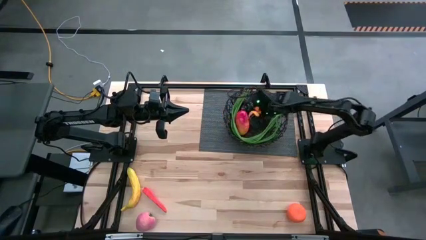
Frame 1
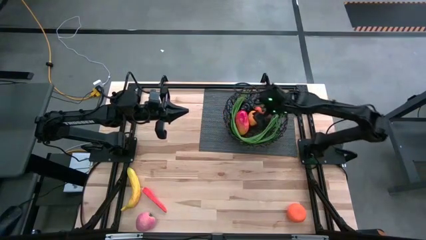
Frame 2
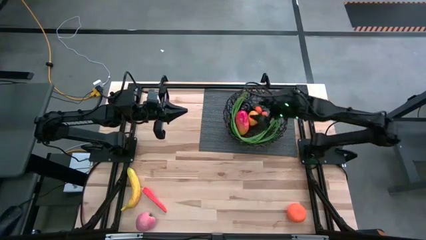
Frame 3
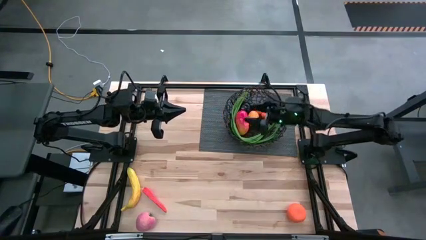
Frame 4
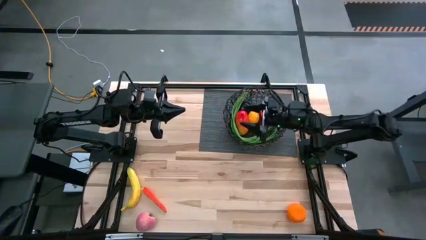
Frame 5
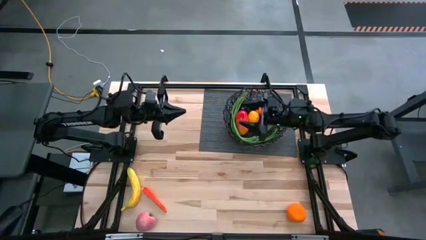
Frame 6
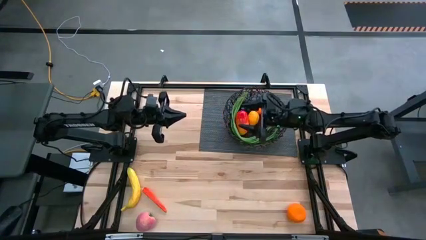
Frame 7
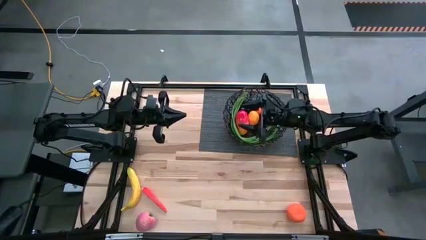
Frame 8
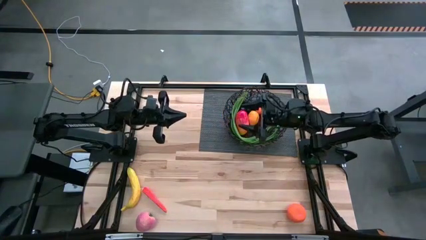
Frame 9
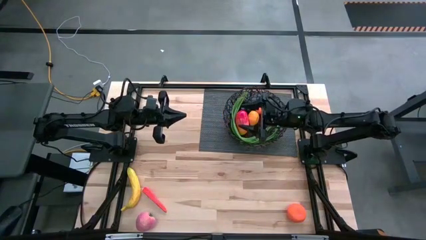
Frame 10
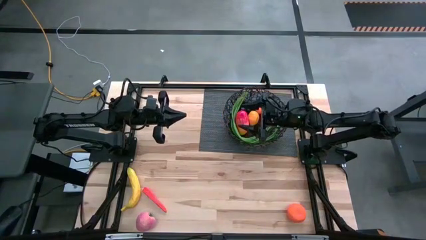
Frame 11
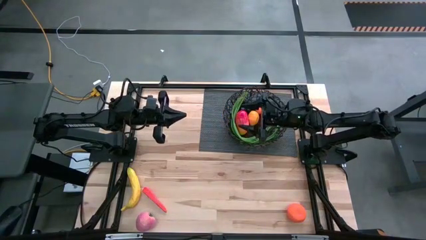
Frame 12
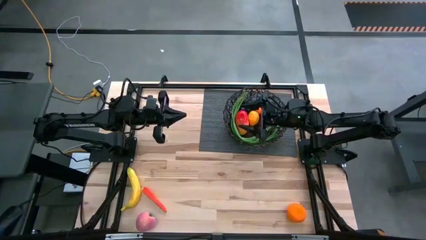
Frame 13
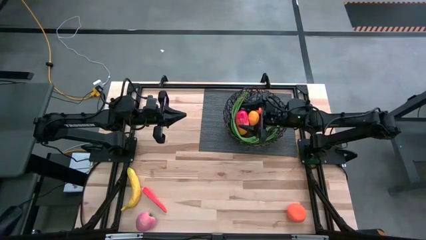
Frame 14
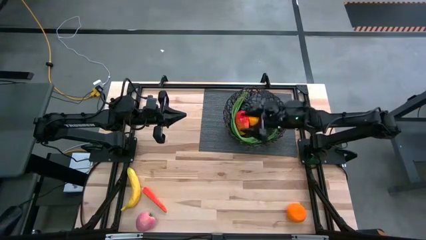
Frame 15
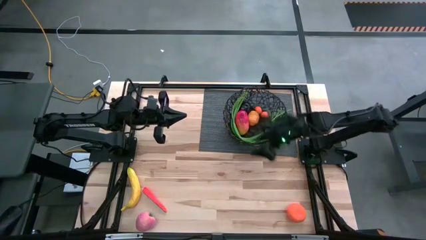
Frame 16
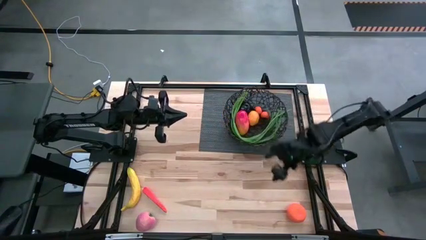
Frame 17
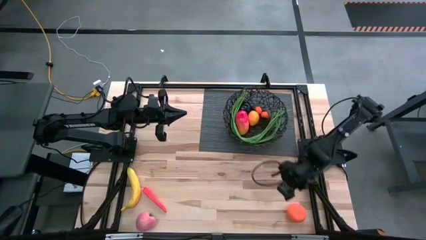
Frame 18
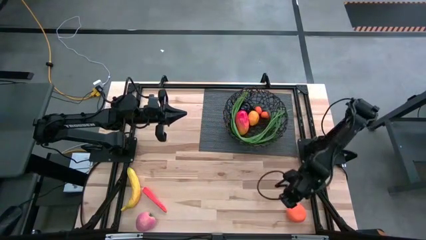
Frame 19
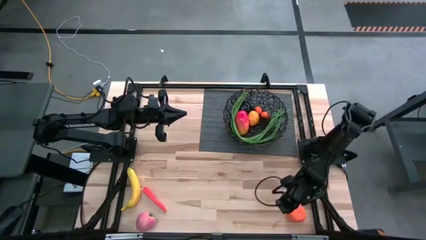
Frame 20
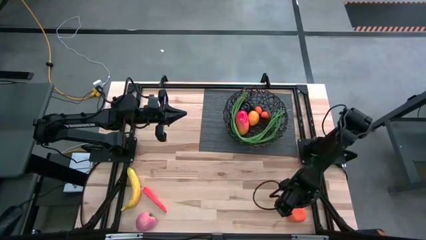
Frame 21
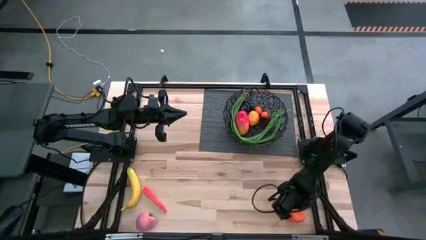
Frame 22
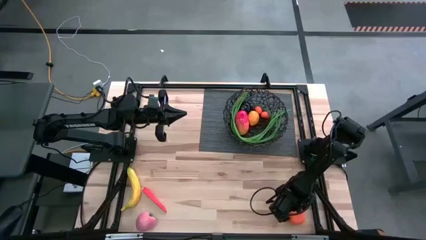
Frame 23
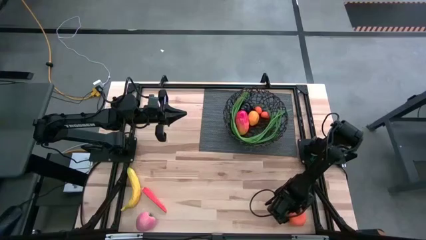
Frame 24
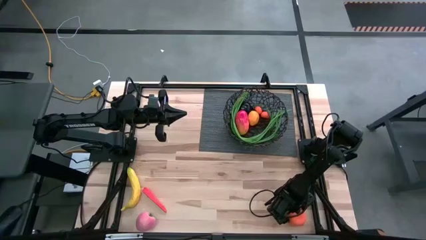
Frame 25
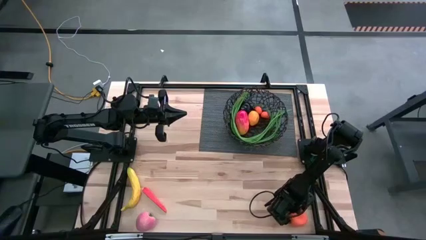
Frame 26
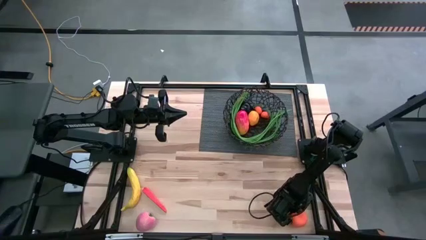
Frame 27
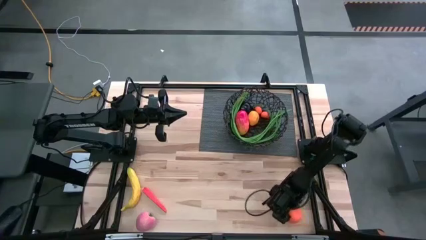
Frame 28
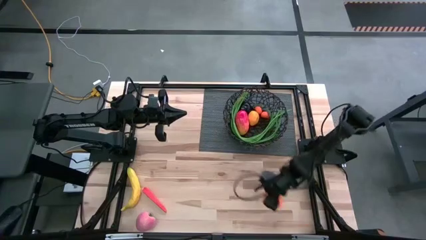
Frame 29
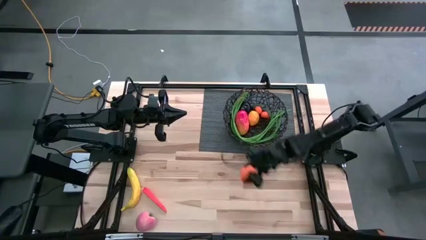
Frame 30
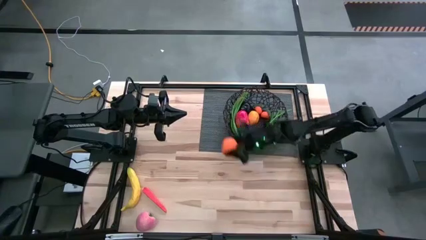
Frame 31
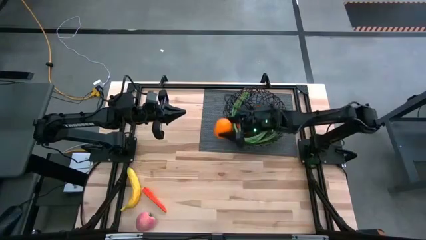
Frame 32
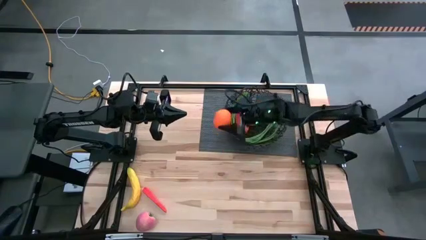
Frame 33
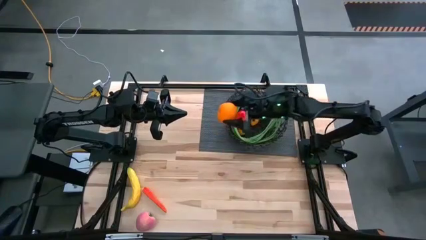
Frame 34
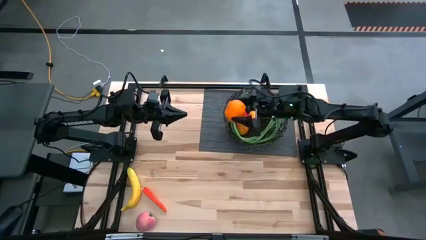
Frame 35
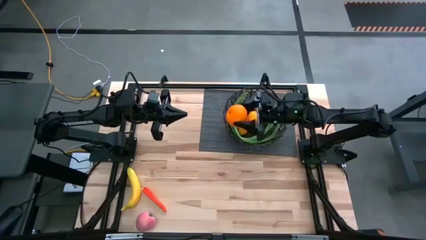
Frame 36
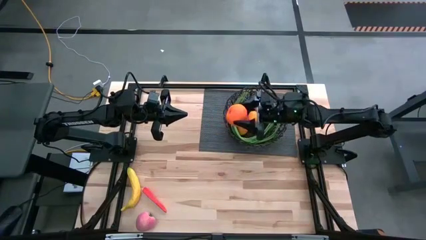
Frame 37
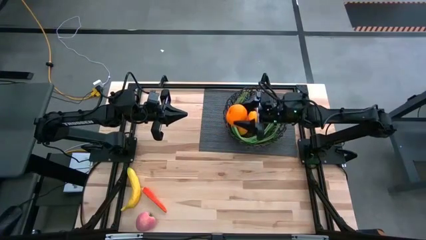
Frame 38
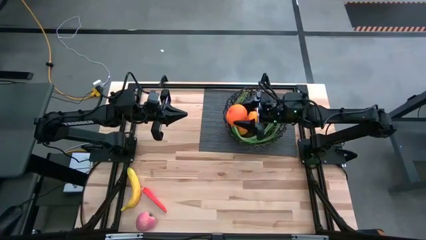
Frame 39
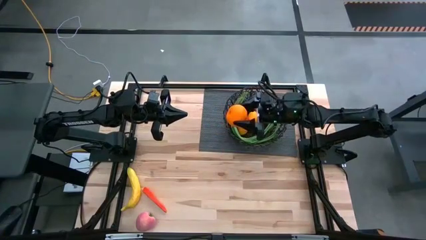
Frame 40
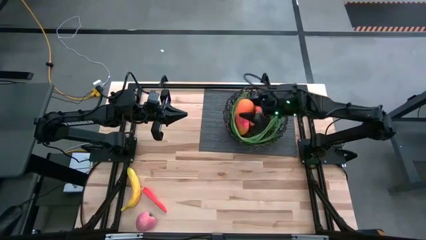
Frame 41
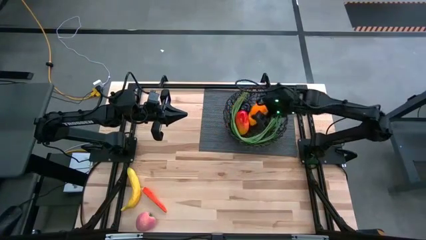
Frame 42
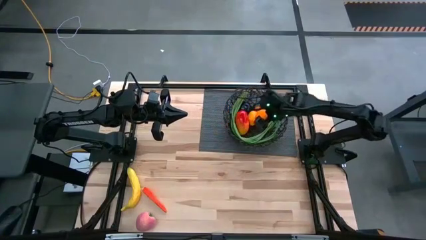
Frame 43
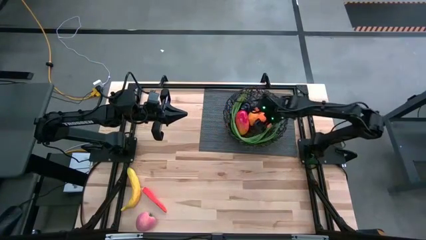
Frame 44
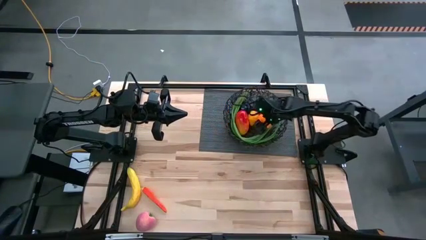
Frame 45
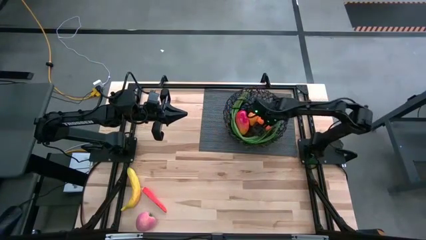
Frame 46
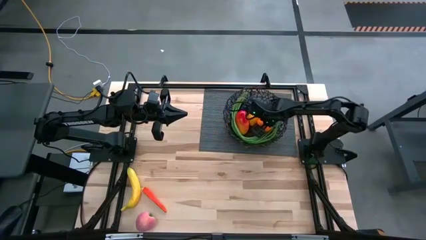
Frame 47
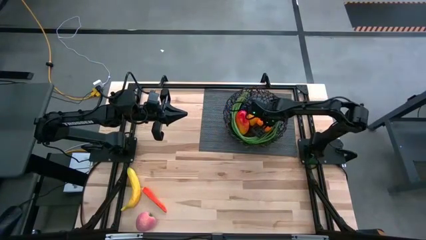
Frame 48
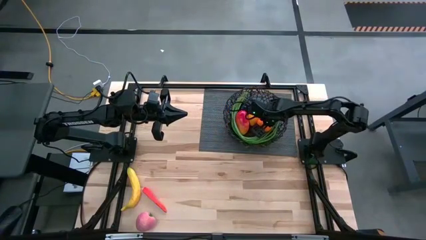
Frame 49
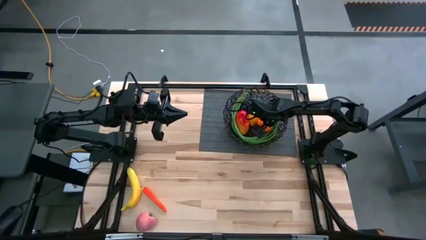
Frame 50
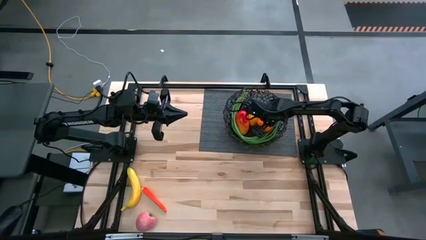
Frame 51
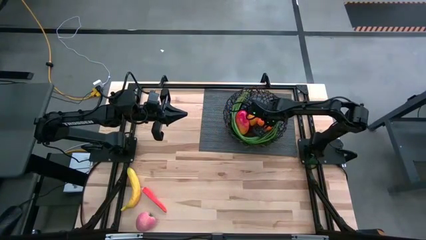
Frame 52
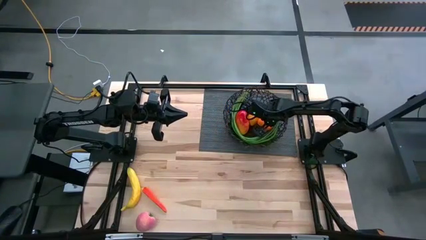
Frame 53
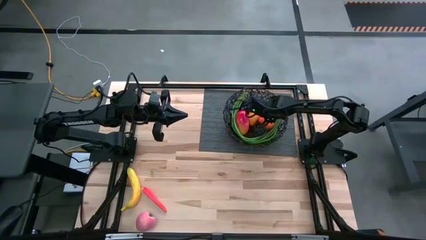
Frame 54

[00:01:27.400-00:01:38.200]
Task: Build produce basket
Put the orange into the wire basket

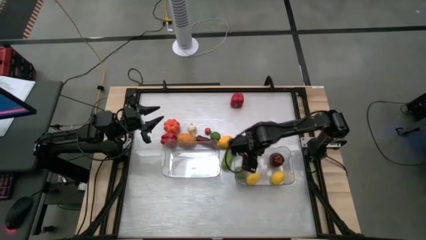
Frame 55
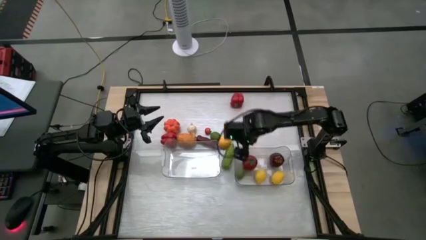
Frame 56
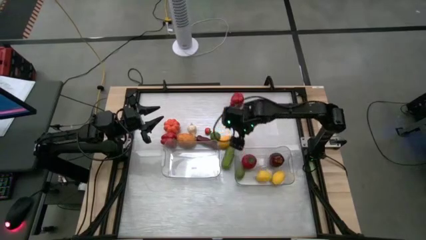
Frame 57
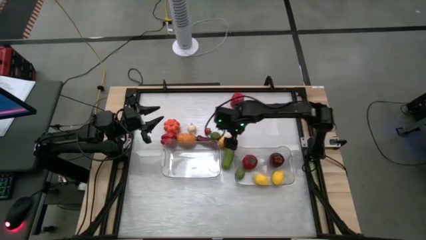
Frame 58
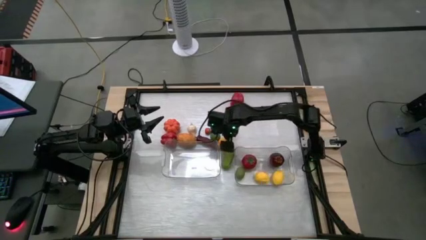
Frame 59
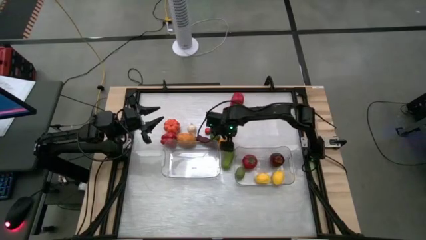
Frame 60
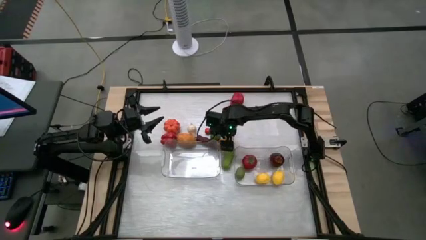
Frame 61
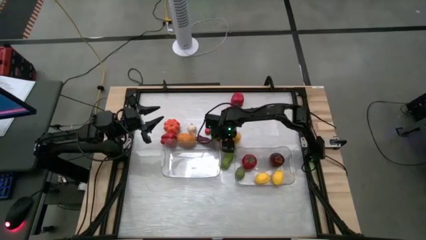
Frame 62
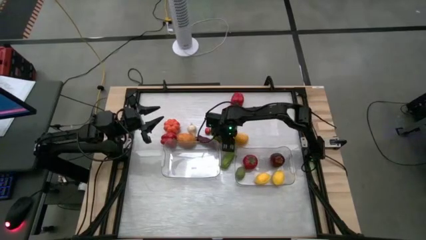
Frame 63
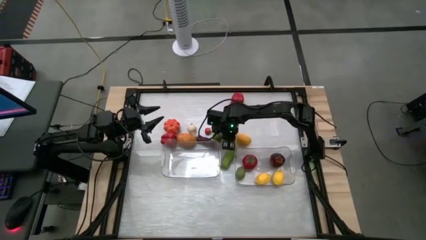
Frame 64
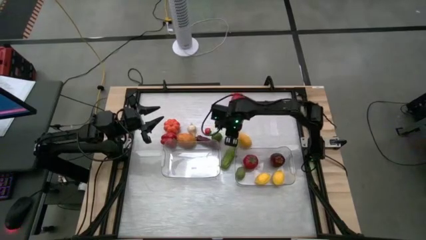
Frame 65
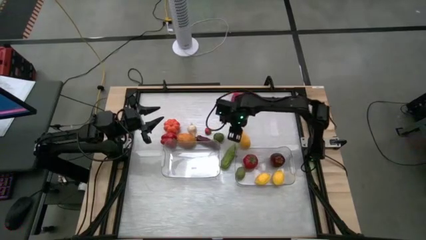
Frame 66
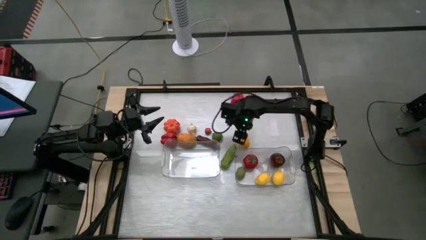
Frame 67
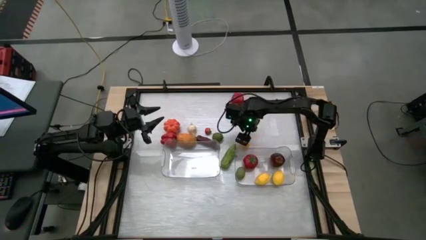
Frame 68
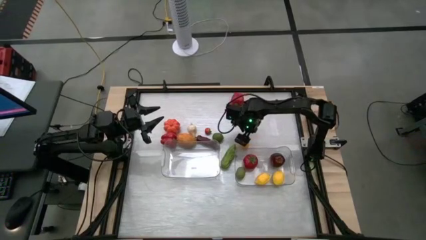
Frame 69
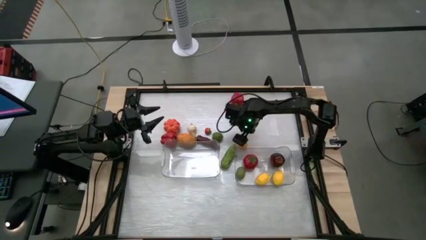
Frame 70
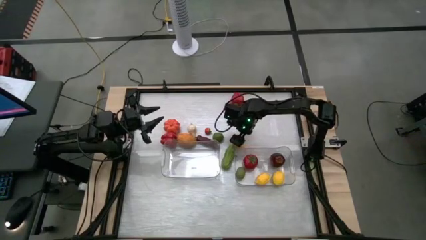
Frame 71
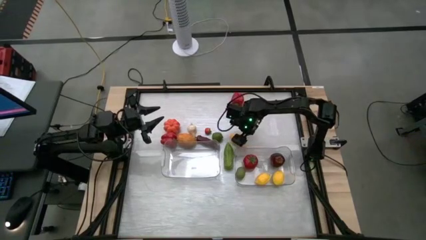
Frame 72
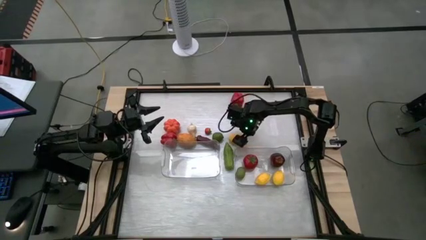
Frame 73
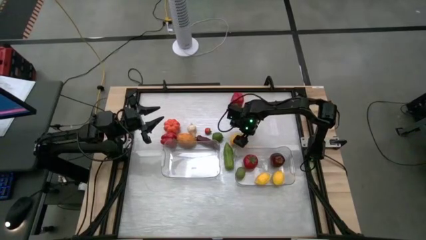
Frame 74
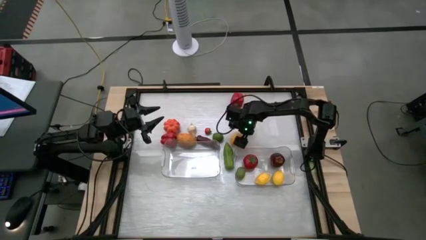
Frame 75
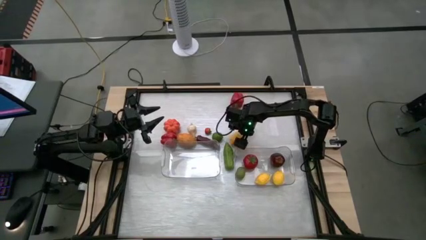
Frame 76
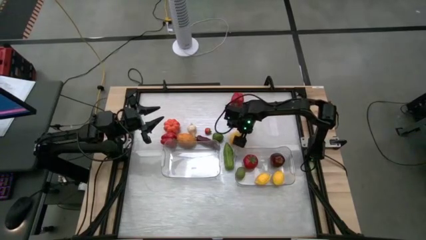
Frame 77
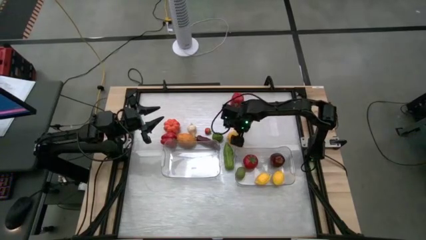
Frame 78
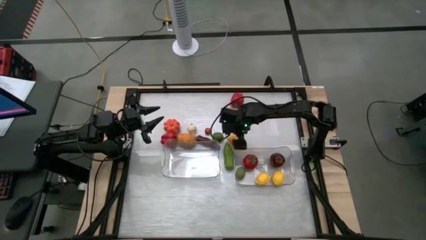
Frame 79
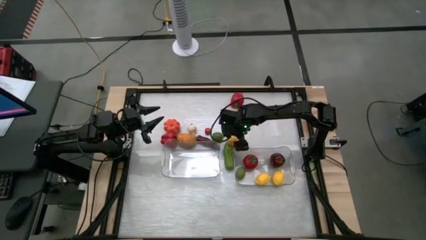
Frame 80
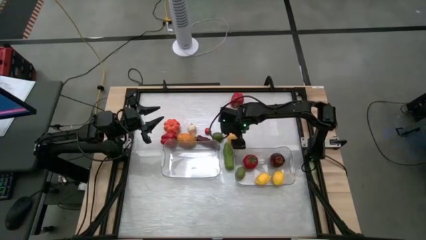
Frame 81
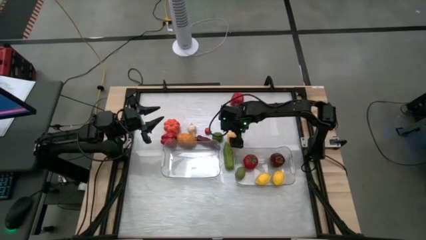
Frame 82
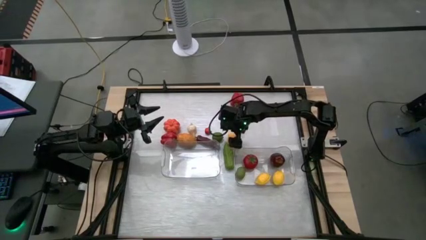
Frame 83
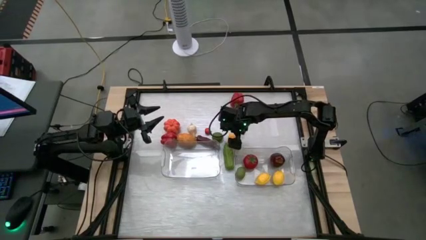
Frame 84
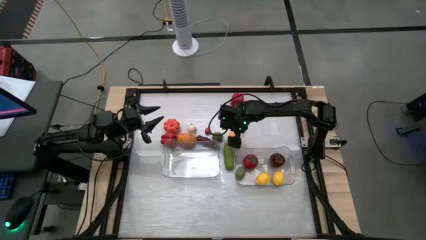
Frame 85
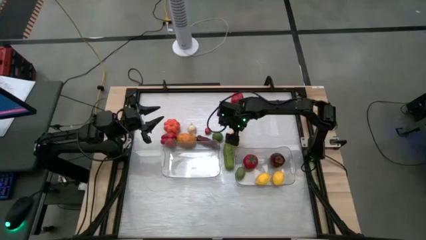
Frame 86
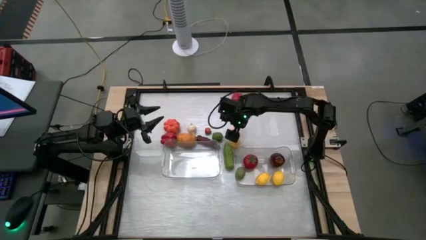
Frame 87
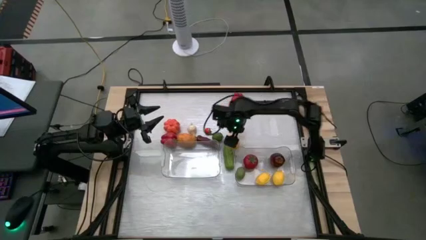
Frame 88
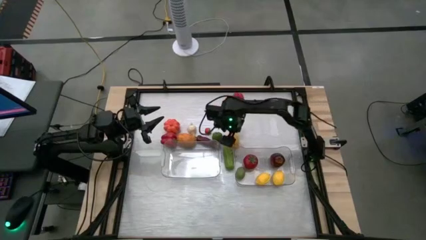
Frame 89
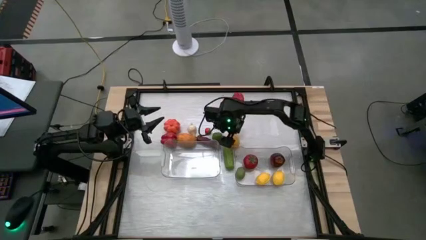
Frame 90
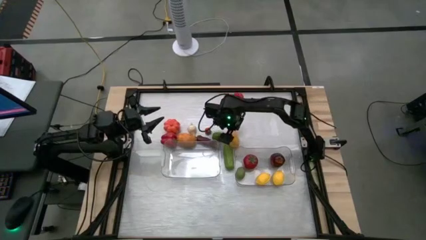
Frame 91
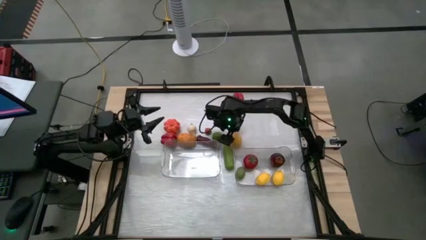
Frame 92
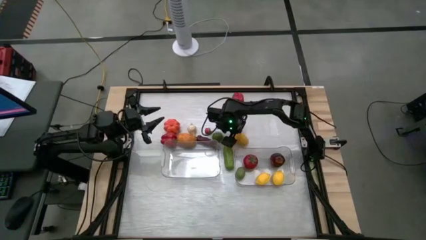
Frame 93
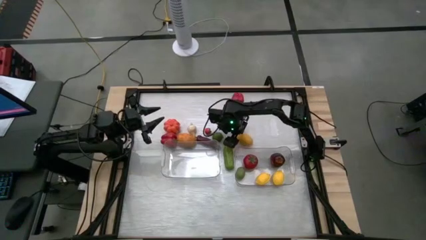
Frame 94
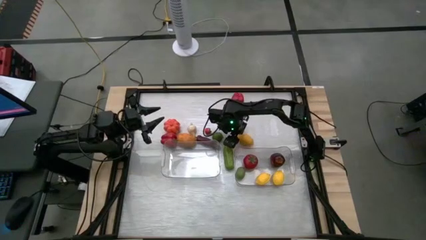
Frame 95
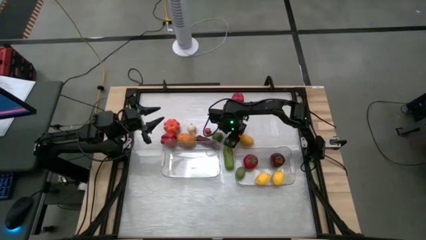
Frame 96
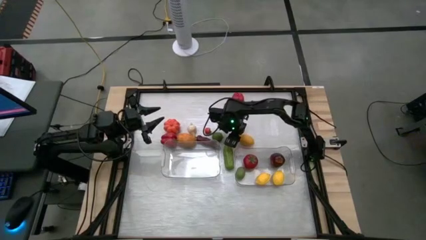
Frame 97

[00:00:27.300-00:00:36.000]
Task: Sort produce into baskets
Put the lemon into the right transparent bin
